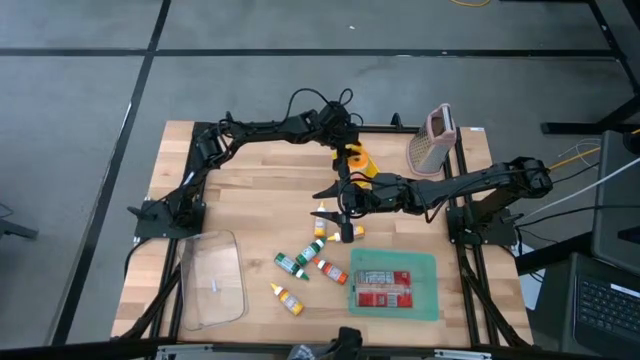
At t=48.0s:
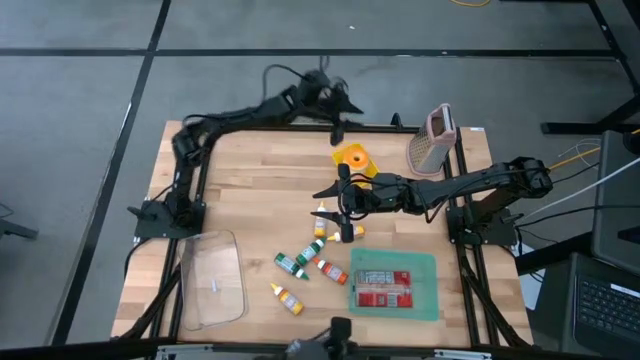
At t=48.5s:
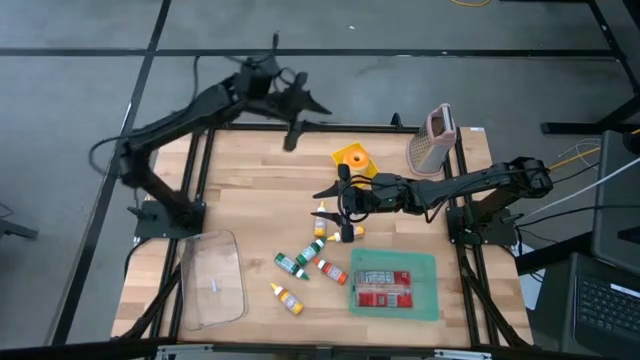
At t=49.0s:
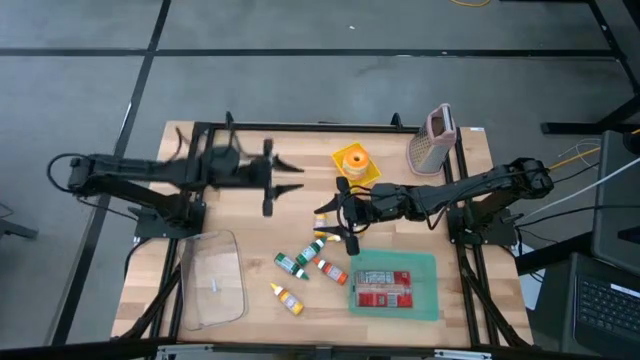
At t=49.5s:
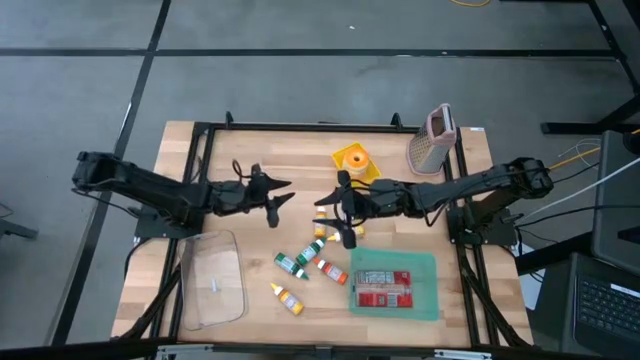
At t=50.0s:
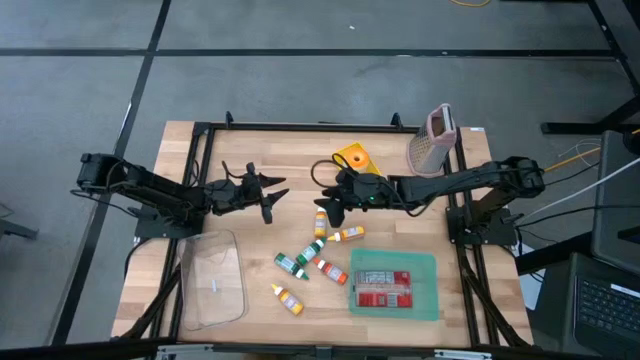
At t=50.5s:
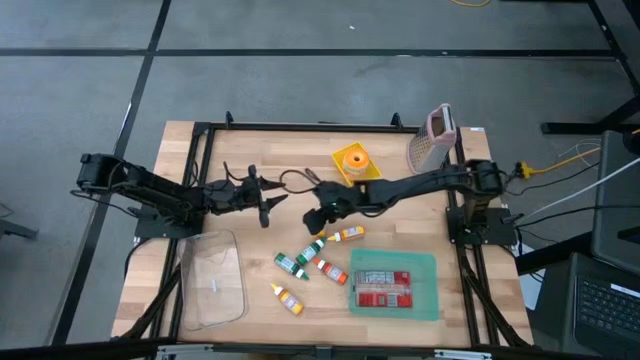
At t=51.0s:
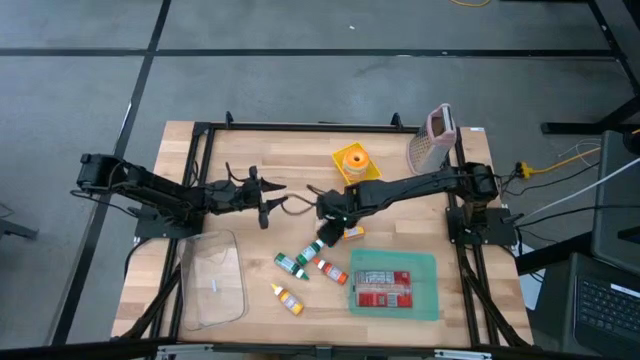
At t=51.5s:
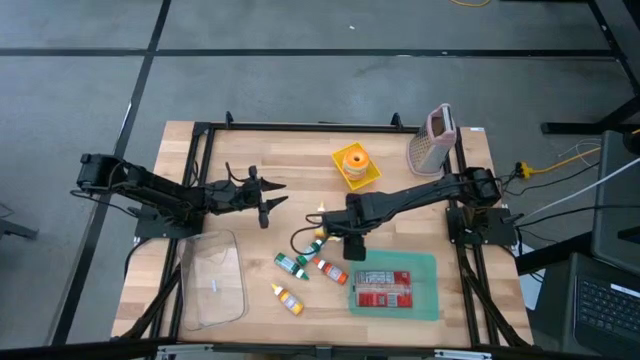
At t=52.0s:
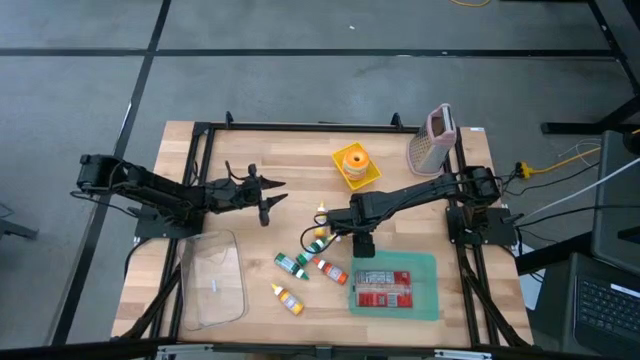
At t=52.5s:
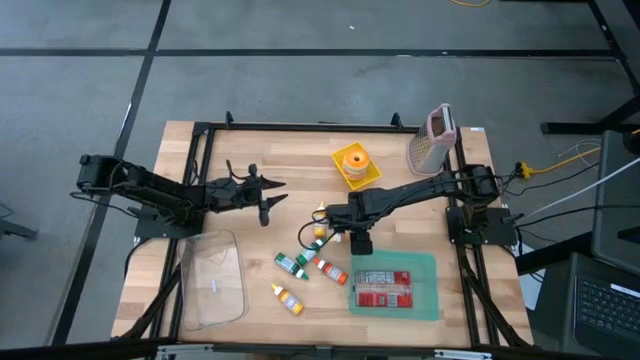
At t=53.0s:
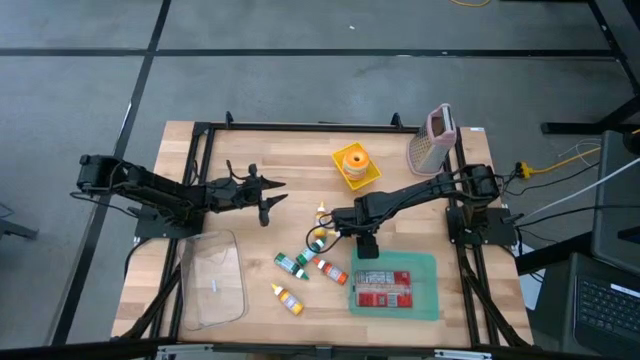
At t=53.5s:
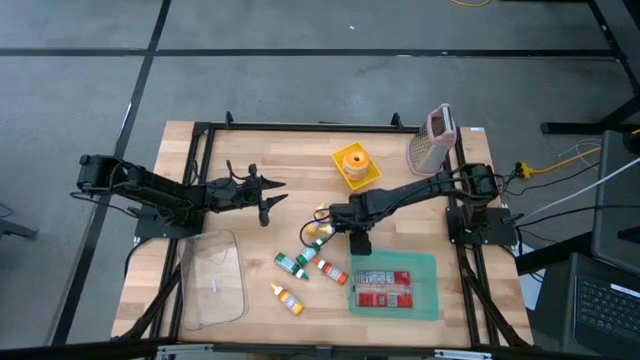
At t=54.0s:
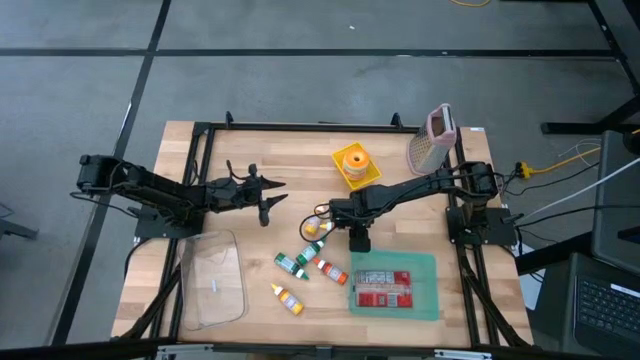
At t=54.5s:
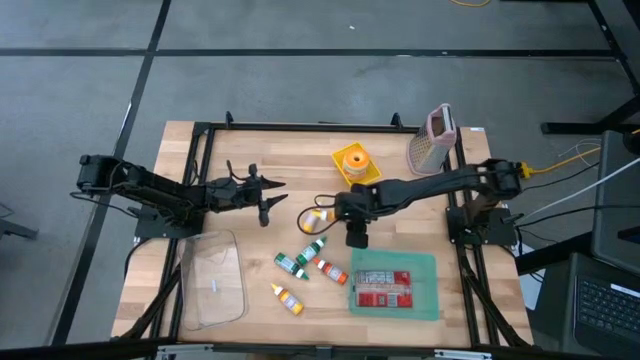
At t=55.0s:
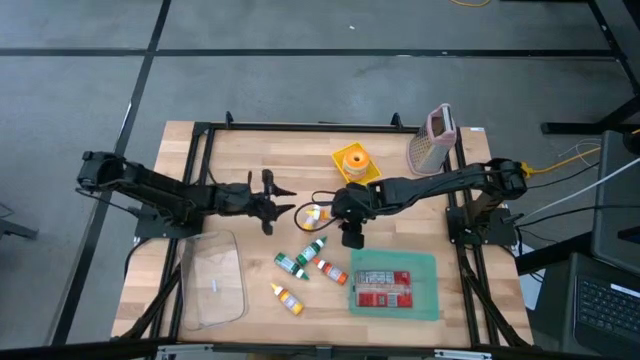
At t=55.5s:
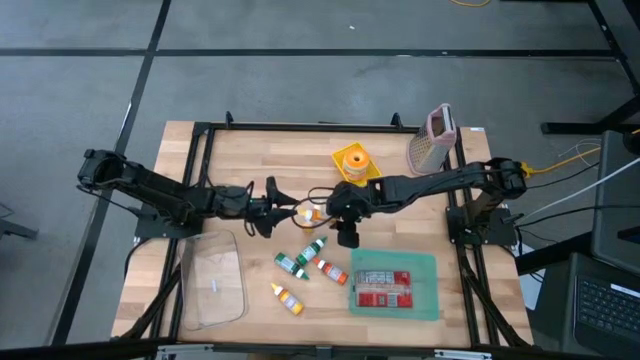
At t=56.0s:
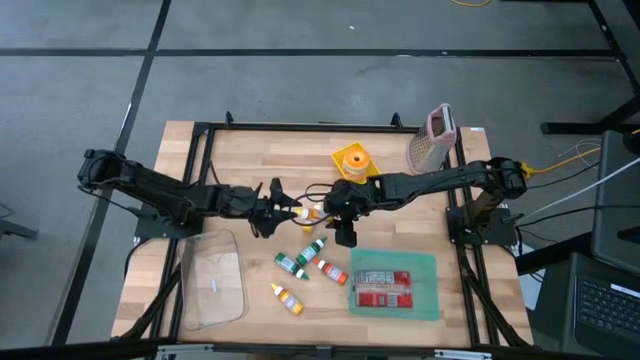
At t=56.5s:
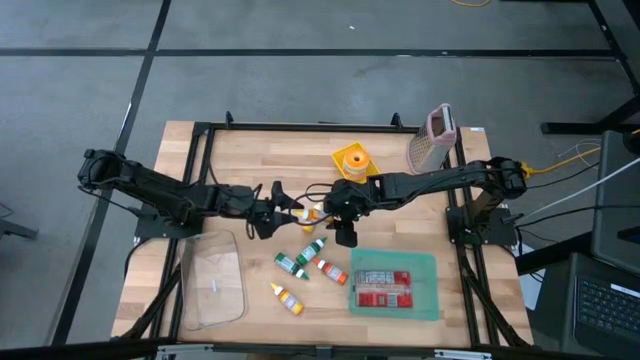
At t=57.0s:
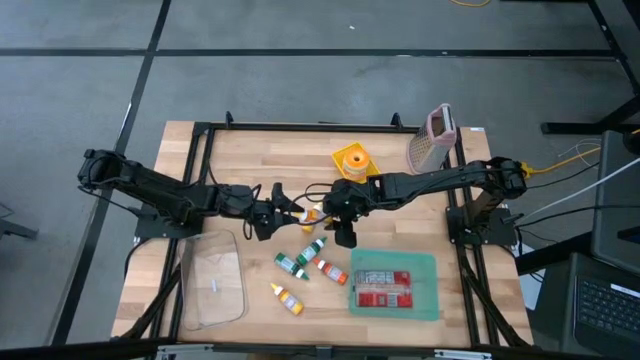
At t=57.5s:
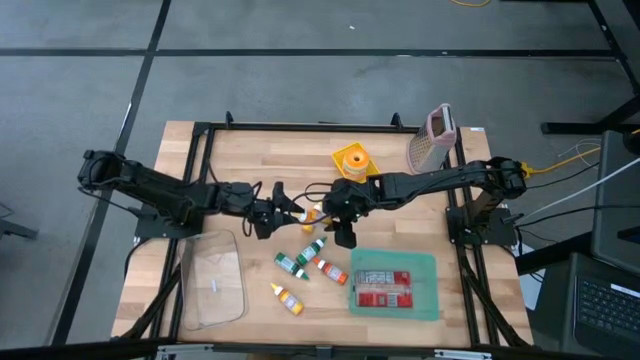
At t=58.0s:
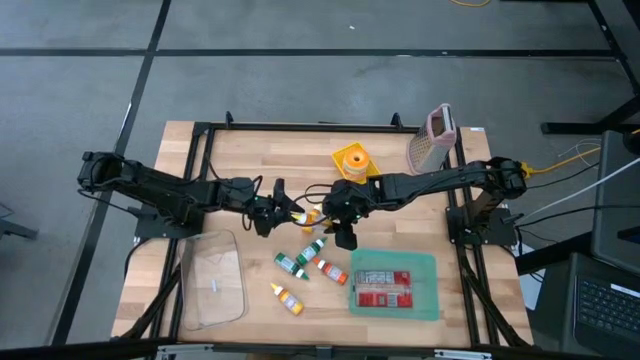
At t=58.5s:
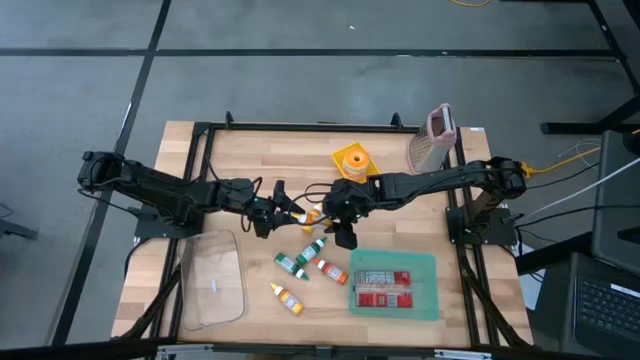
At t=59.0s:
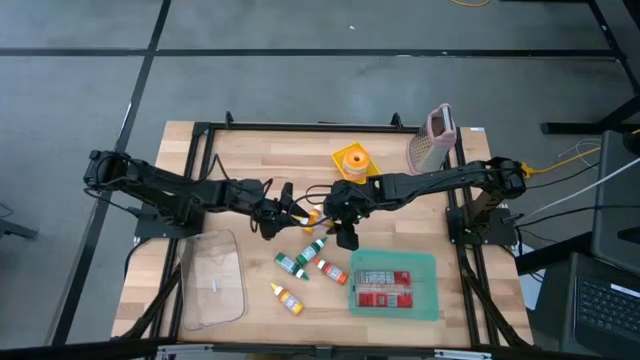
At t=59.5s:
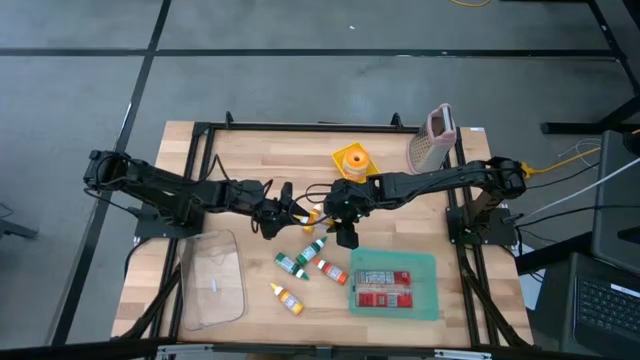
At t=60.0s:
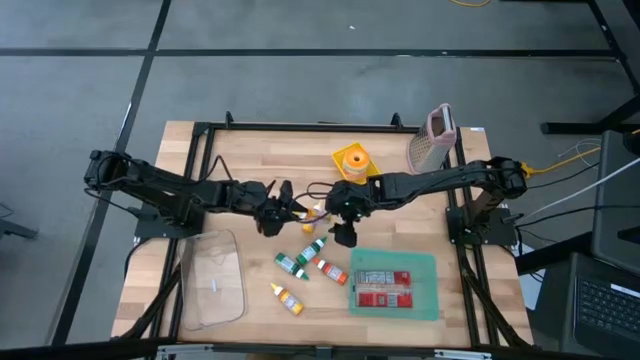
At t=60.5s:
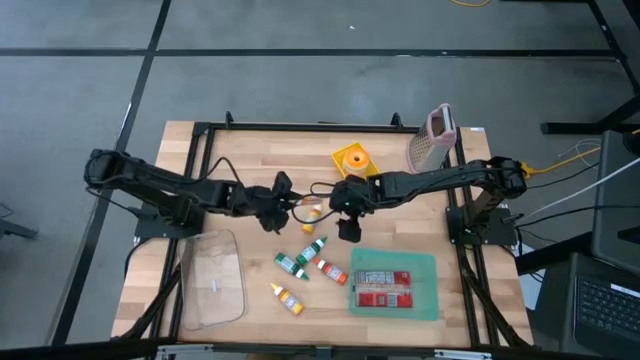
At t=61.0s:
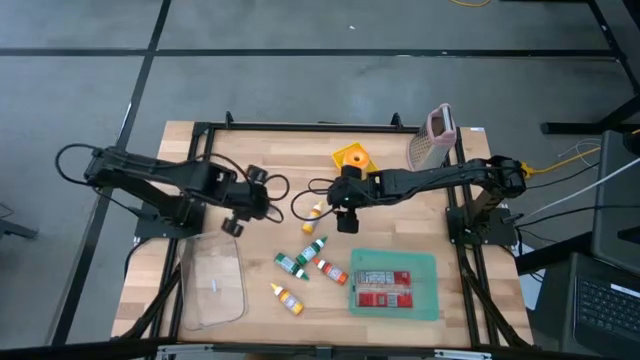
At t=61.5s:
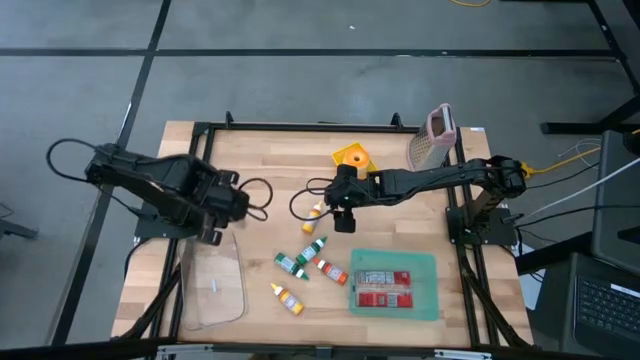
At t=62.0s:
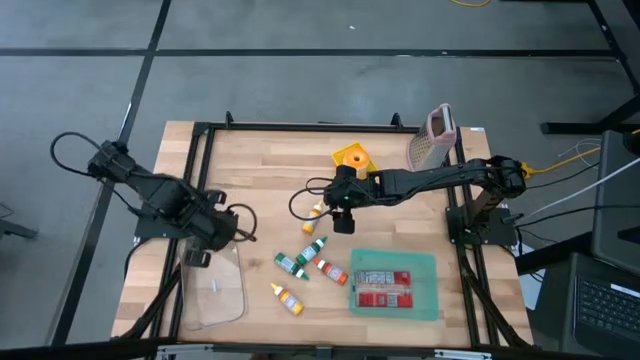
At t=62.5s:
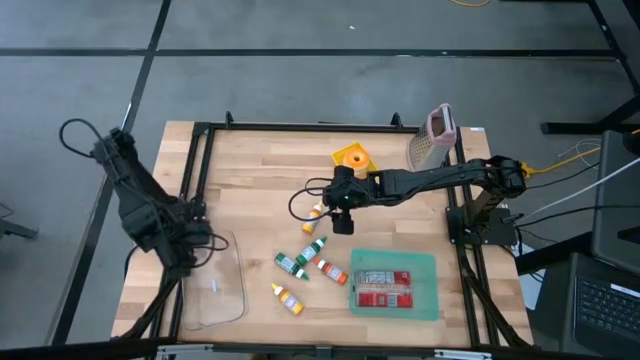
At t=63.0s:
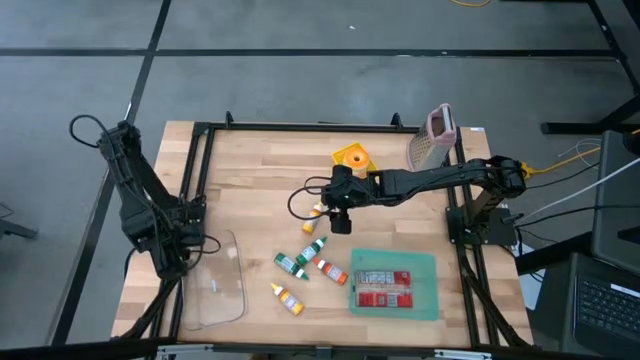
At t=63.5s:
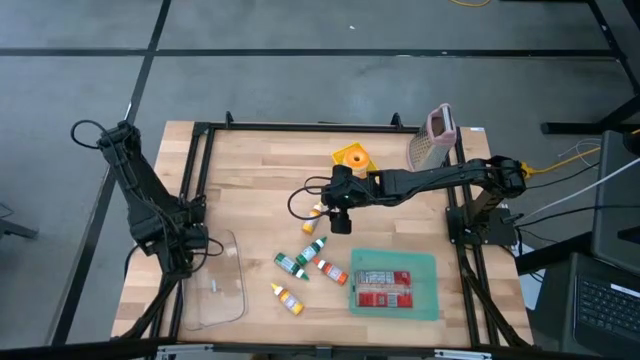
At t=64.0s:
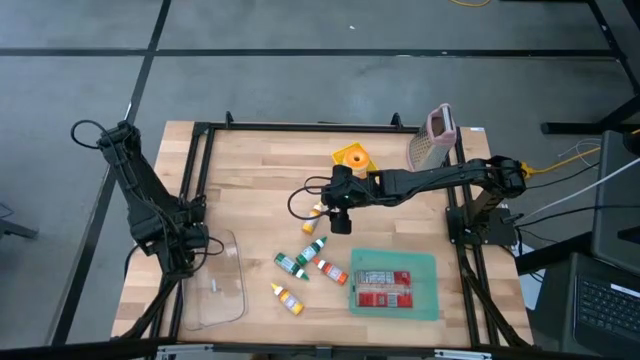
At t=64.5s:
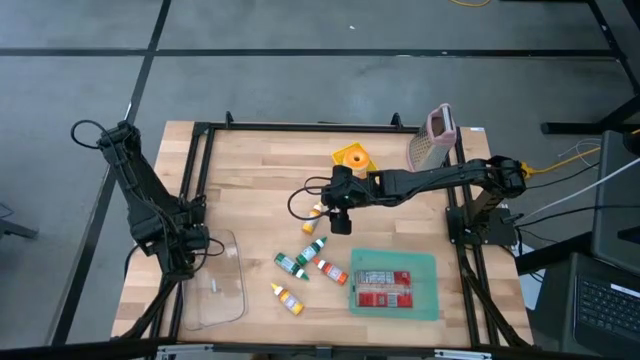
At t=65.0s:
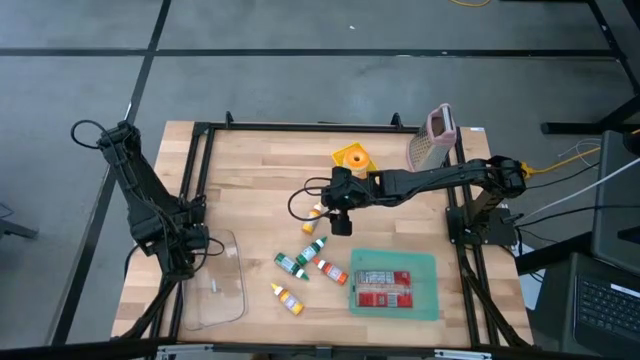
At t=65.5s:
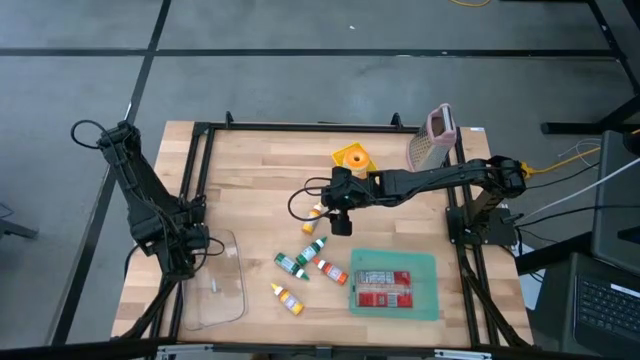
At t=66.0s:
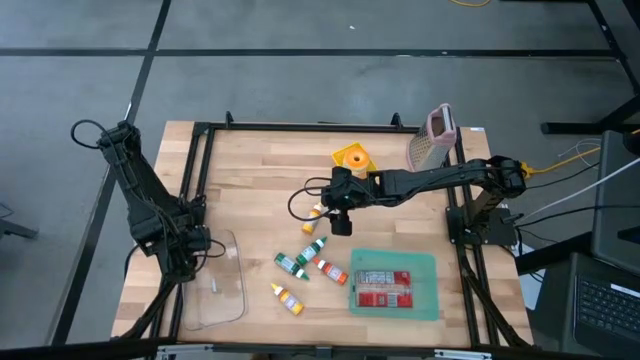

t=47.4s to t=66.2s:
Put the top right yellow food coloring bottle into the transparent bin
